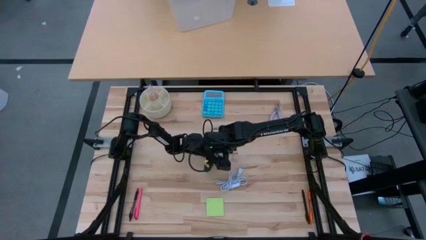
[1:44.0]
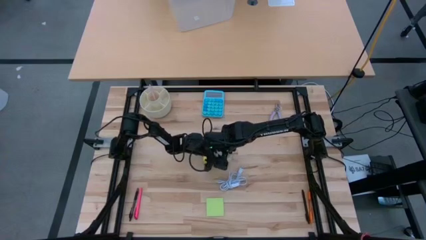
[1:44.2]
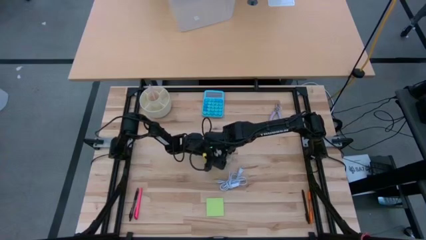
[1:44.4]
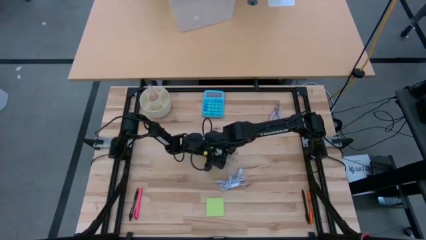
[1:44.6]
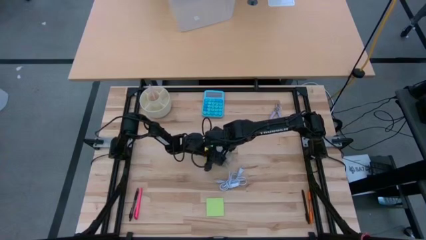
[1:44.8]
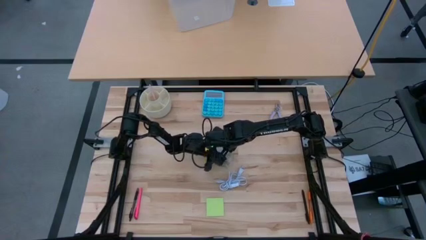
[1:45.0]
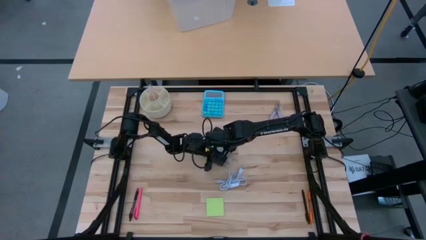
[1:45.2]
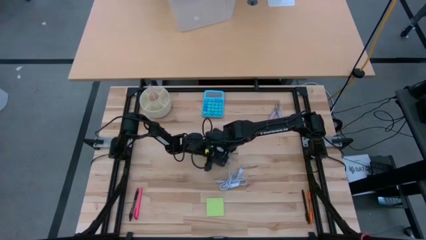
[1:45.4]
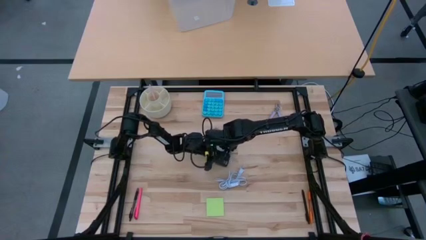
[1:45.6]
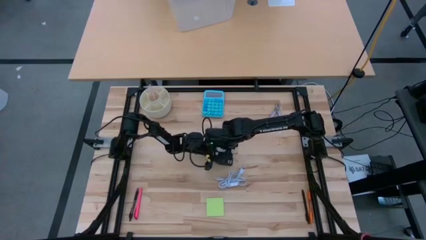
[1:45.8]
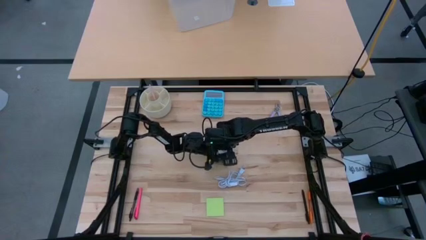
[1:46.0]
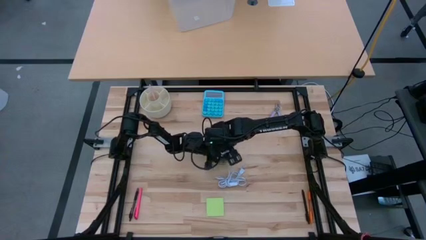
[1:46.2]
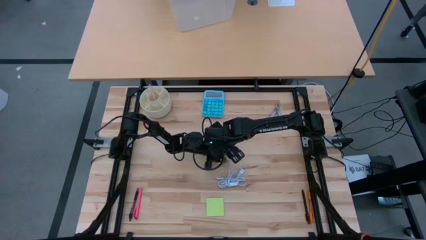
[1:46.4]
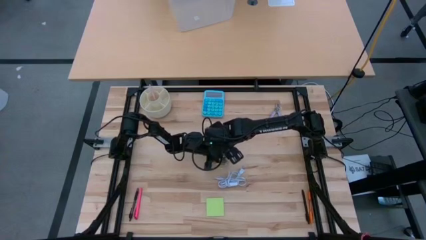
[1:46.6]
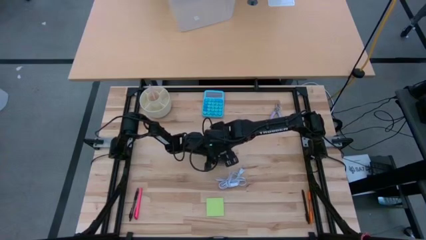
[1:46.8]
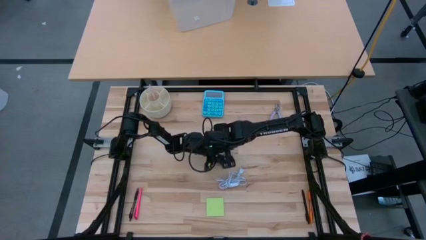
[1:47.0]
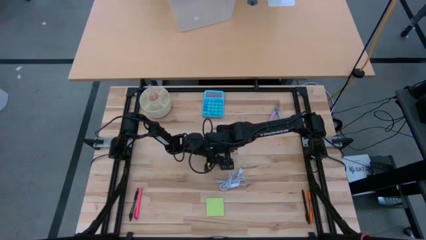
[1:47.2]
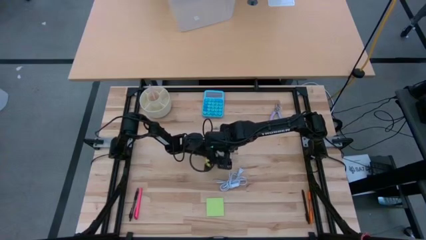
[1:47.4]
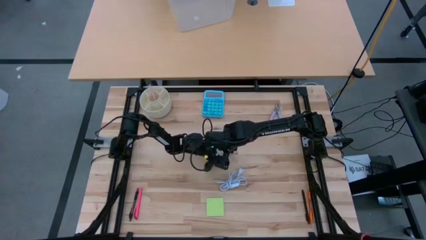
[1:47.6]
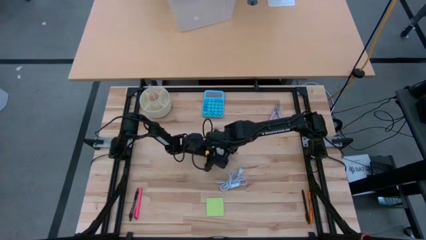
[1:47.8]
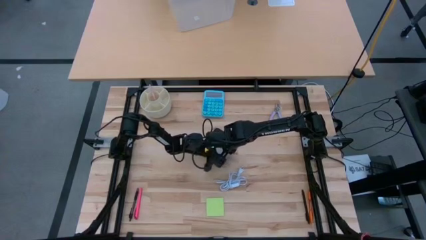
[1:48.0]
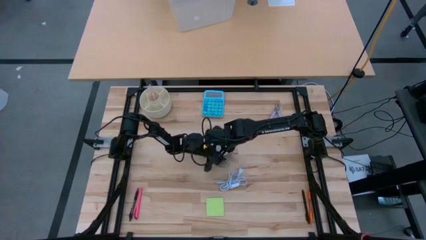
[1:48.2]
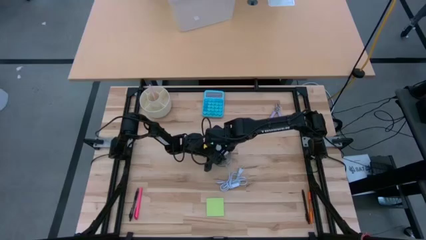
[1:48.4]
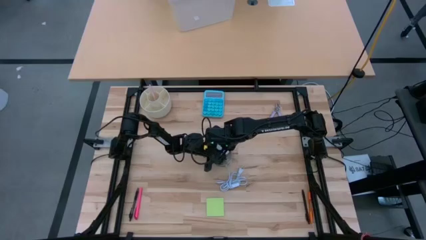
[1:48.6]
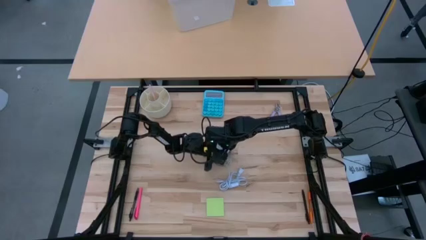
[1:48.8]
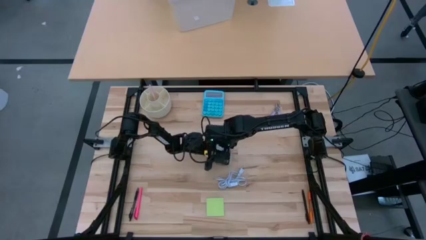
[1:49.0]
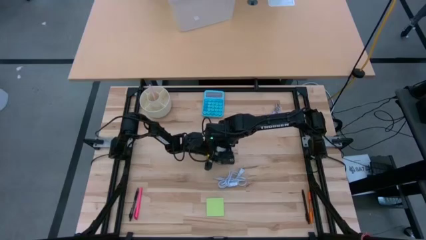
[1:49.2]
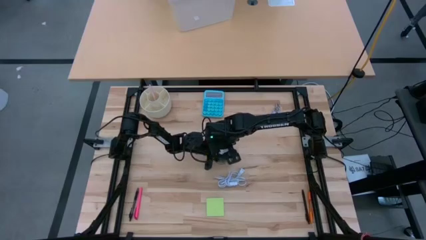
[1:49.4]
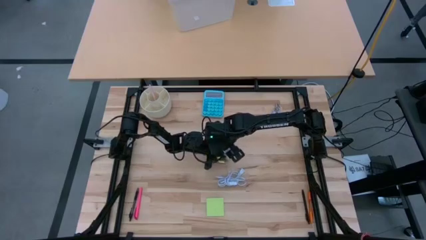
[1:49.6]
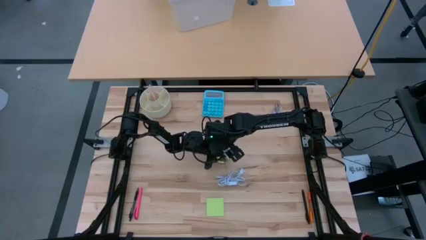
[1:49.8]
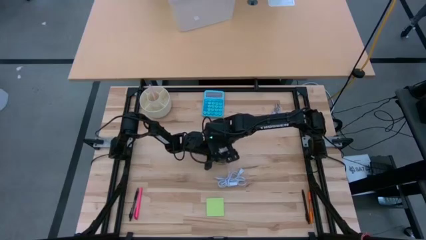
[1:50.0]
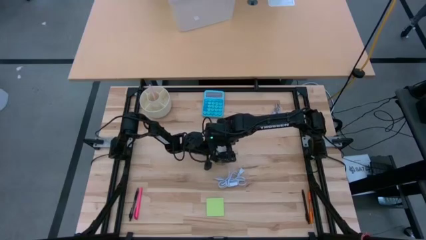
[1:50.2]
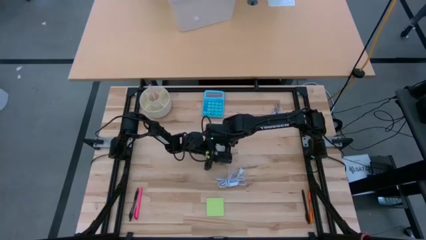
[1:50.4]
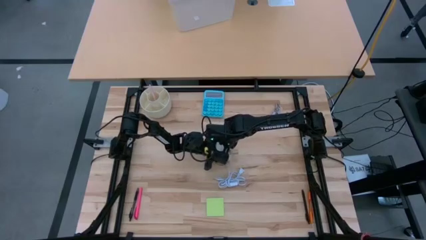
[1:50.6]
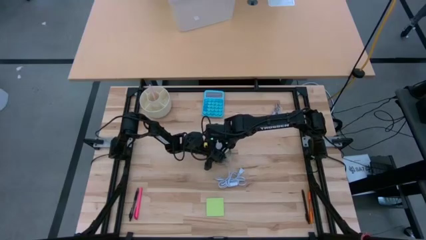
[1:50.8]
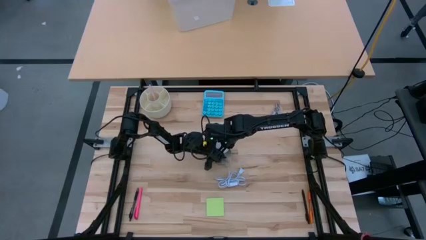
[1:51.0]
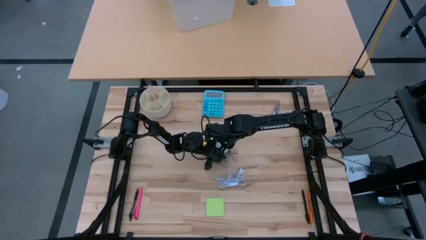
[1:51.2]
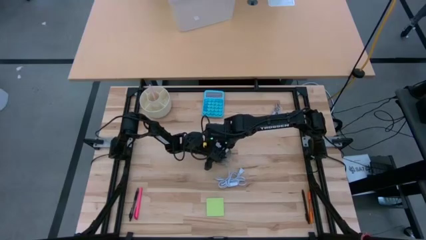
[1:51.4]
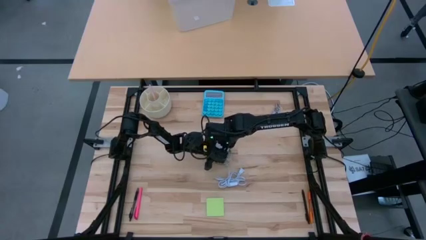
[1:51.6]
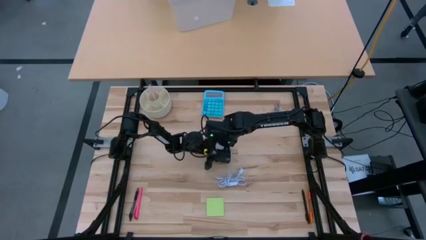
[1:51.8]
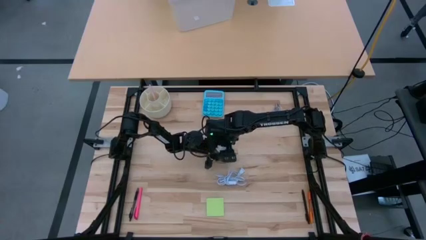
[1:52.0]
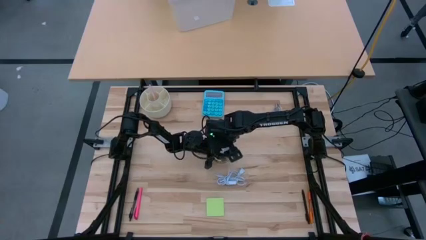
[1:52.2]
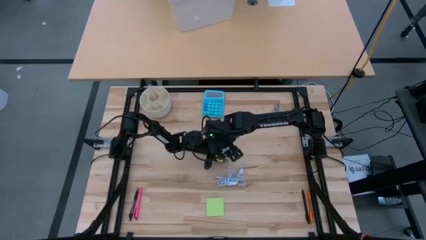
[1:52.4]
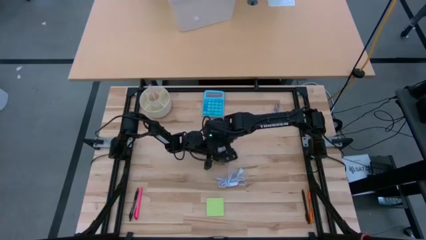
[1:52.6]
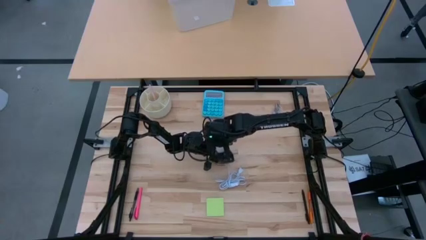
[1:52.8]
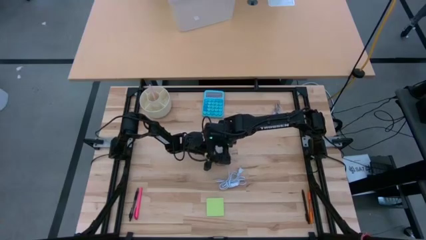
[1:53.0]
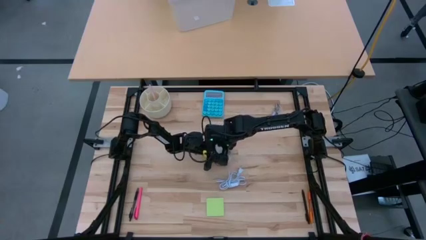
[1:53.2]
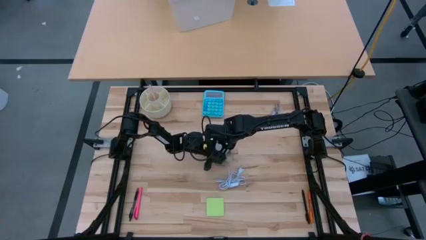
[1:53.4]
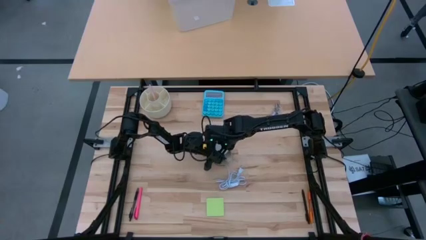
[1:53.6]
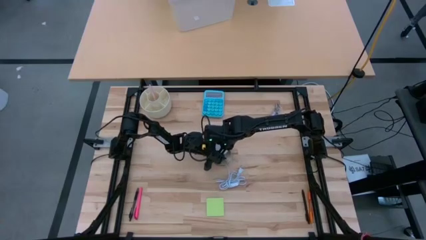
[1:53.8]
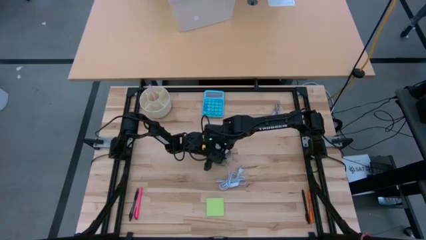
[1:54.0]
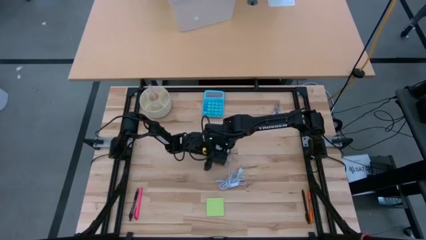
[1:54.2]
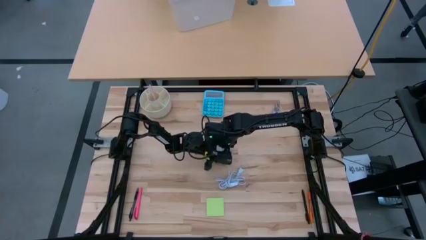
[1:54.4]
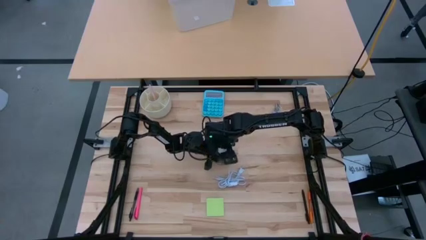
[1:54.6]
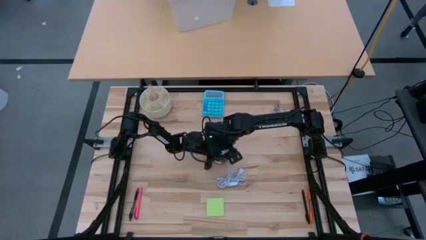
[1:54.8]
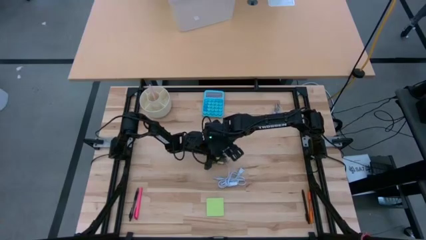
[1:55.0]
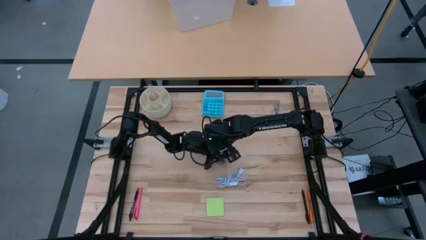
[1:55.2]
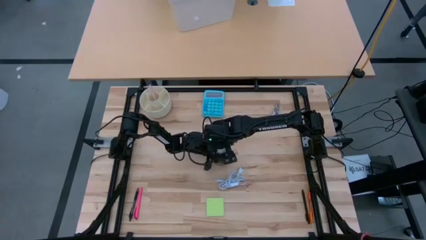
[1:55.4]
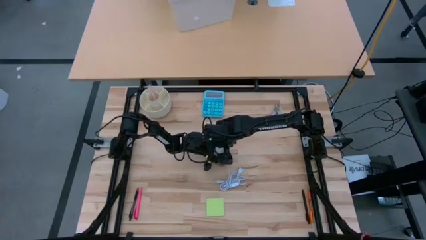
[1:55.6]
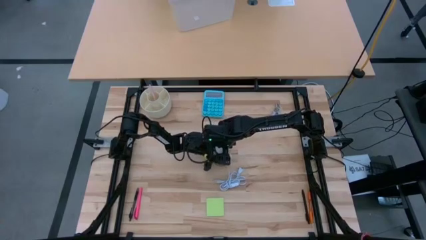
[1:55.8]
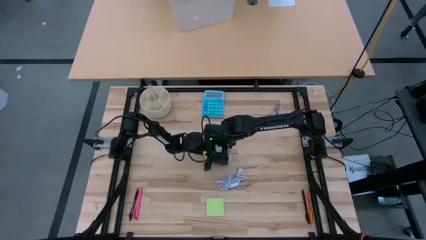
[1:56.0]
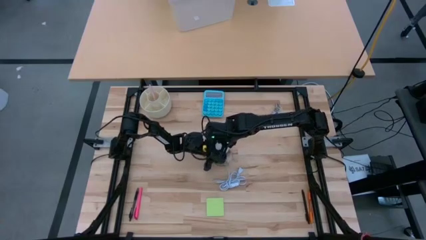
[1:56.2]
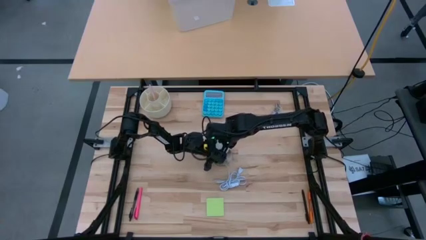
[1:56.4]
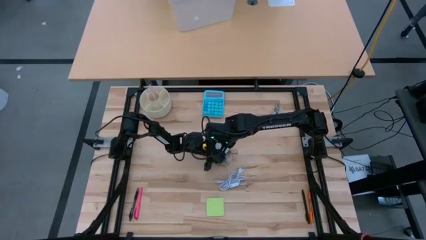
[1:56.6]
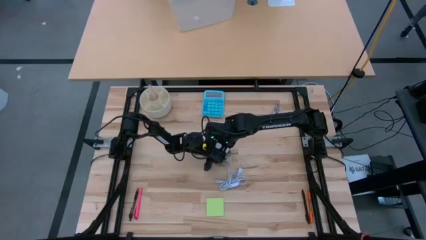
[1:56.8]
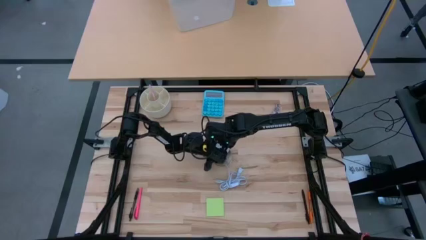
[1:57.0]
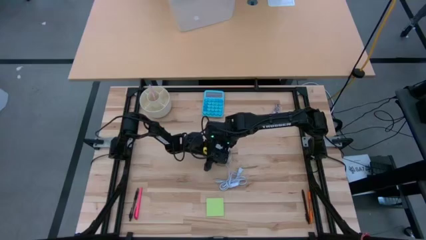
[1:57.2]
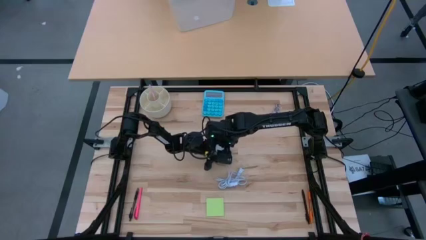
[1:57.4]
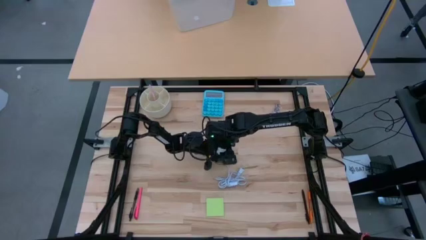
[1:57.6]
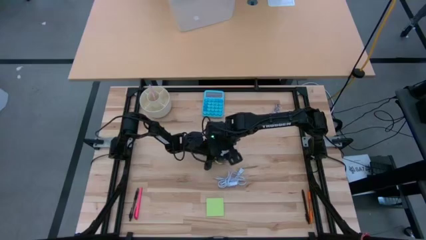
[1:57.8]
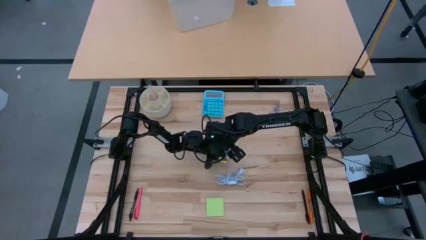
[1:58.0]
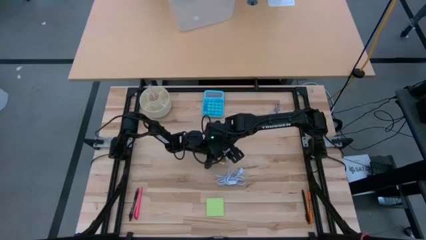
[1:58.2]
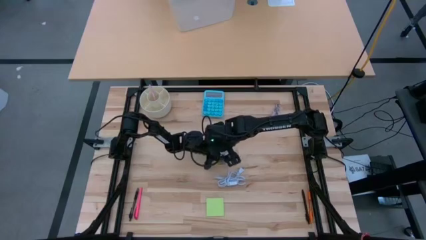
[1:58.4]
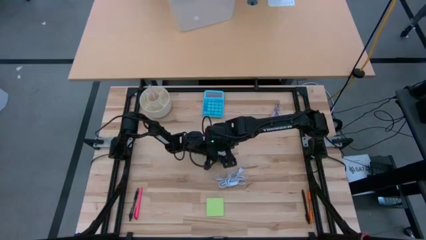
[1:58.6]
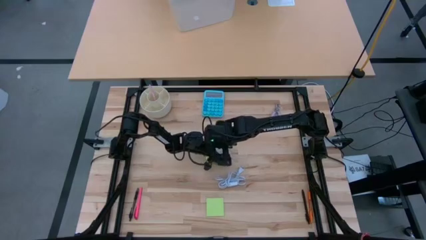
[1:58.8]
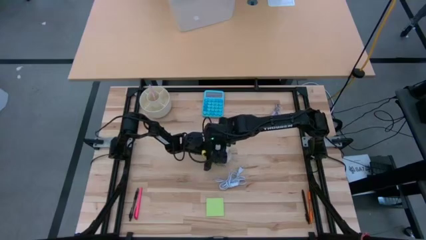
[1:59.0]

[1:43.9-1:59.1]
Task: Screw lightbulb
Remove the lightbulb from the lamp
